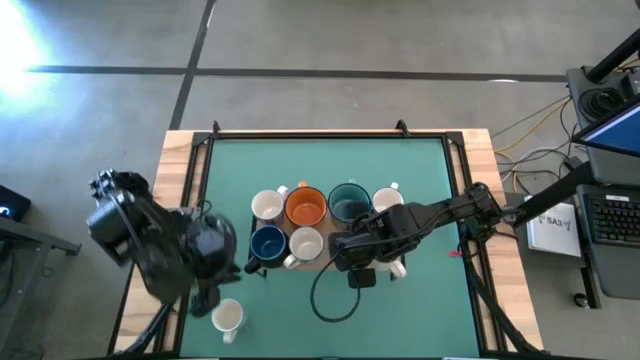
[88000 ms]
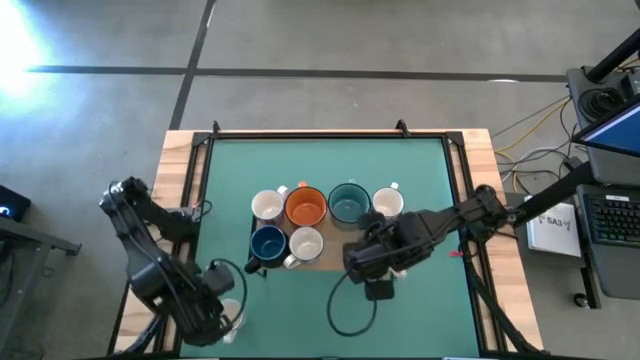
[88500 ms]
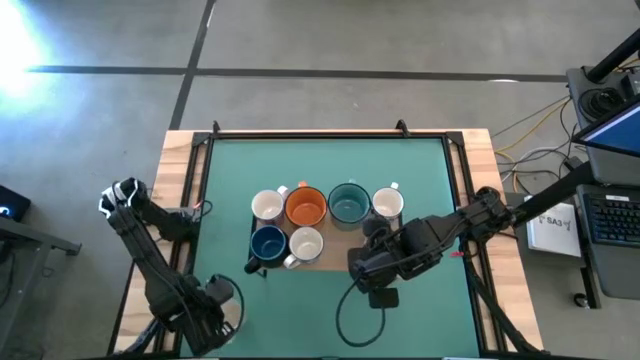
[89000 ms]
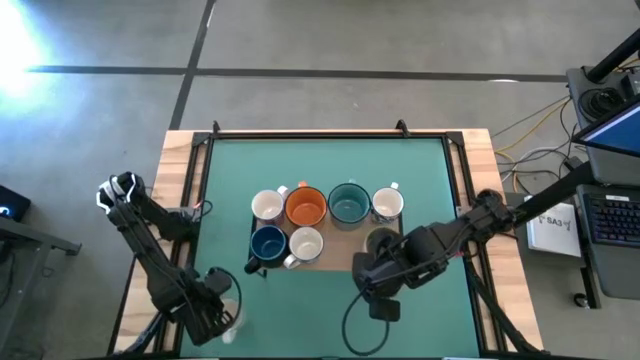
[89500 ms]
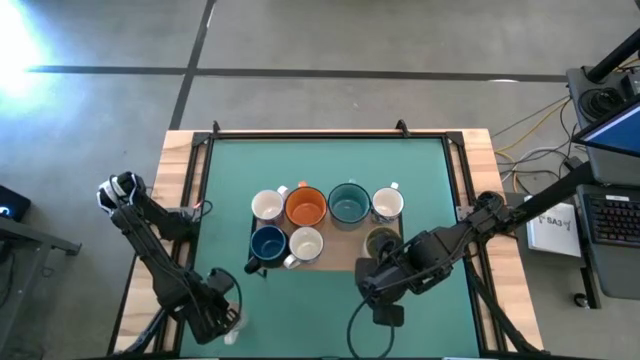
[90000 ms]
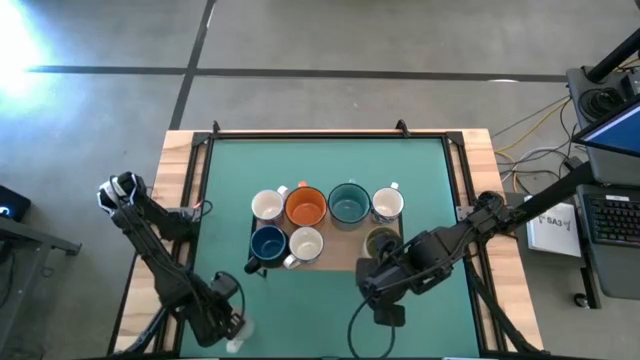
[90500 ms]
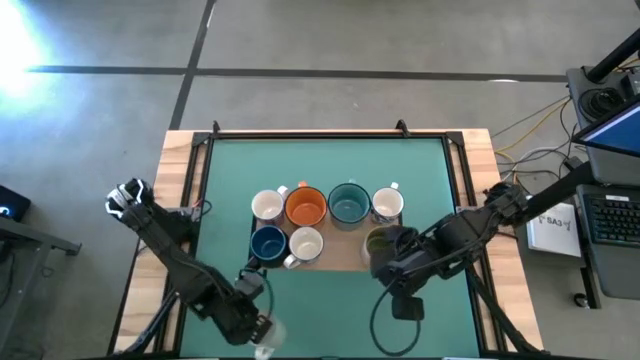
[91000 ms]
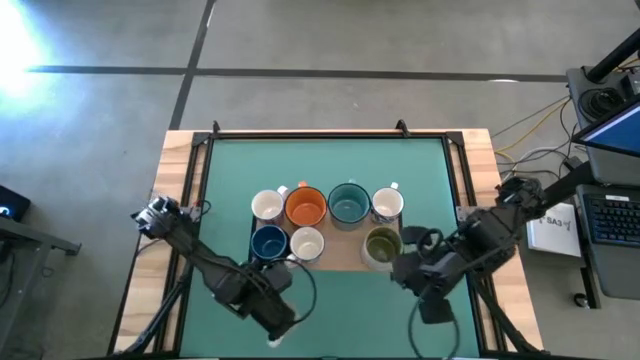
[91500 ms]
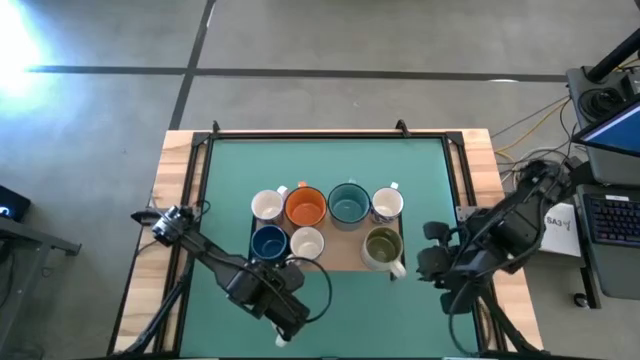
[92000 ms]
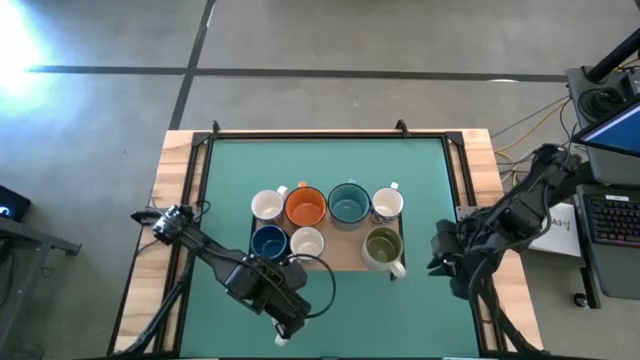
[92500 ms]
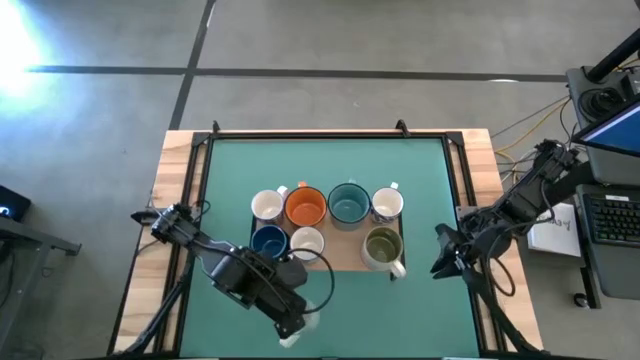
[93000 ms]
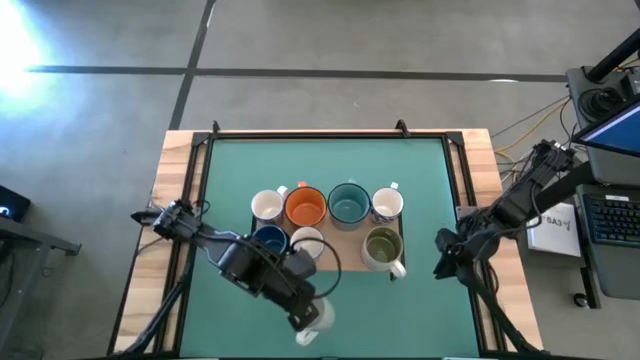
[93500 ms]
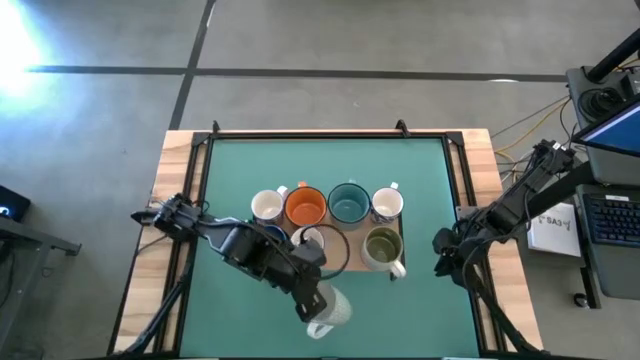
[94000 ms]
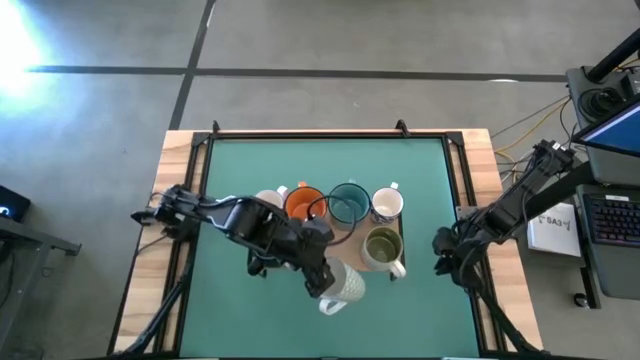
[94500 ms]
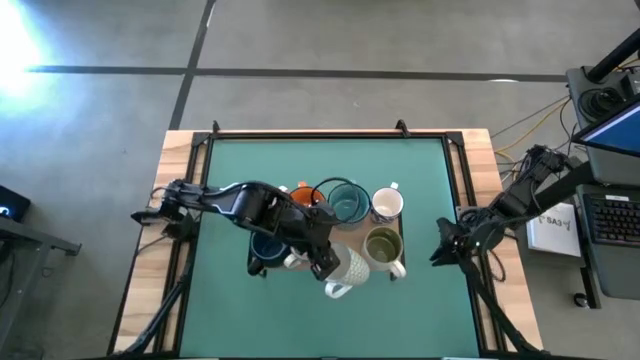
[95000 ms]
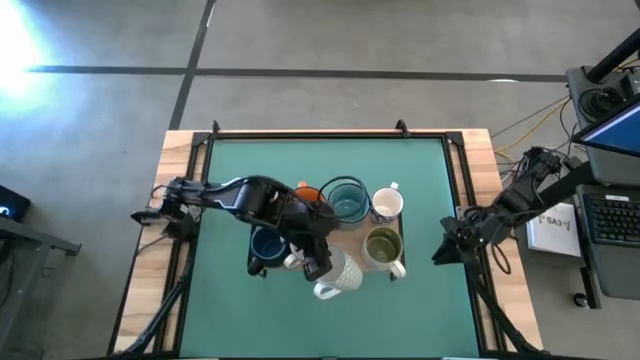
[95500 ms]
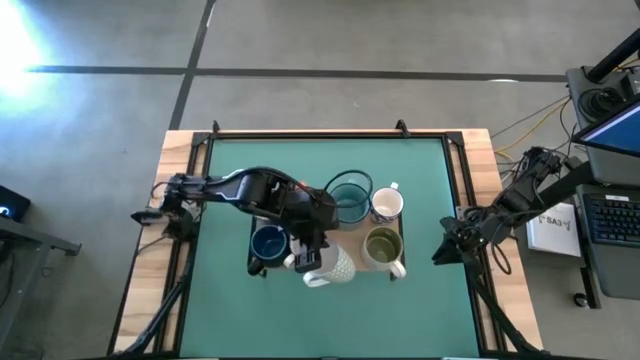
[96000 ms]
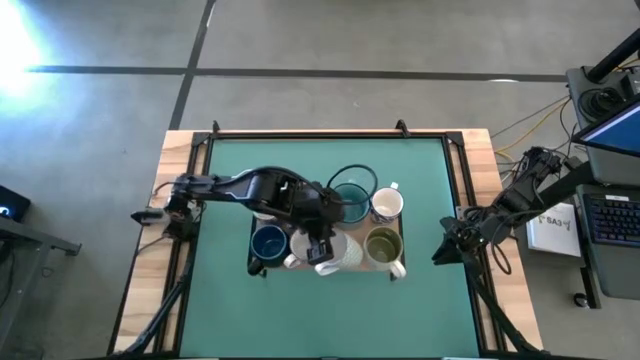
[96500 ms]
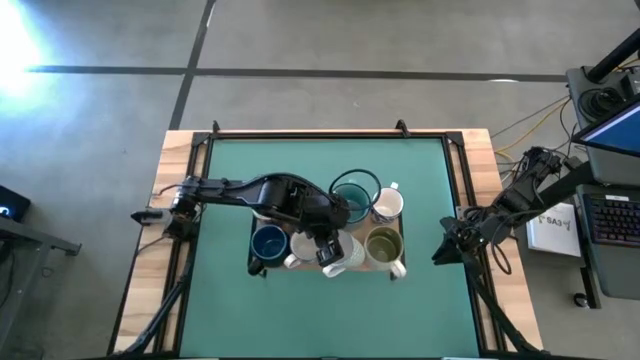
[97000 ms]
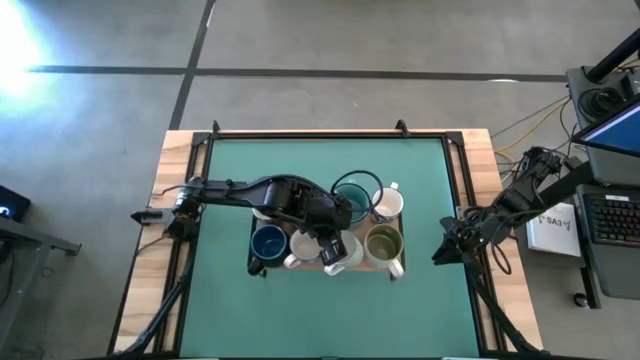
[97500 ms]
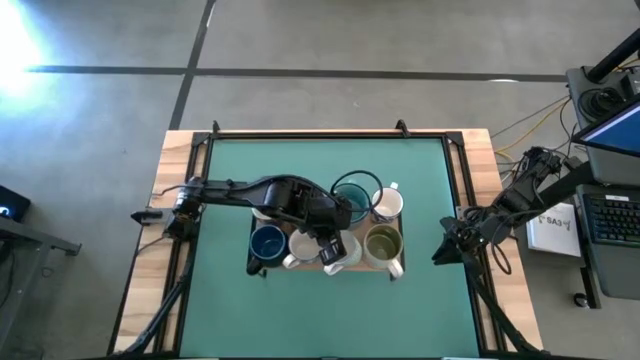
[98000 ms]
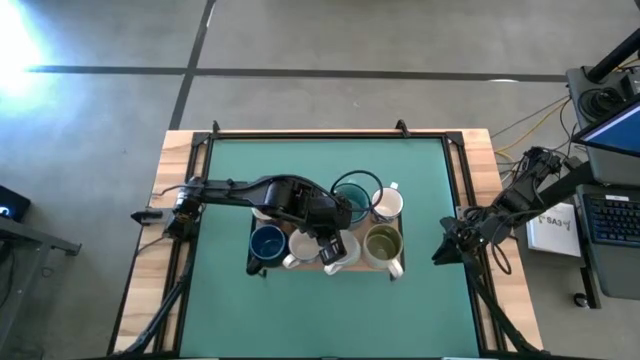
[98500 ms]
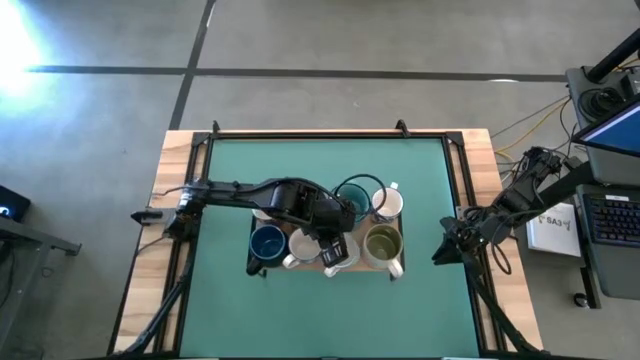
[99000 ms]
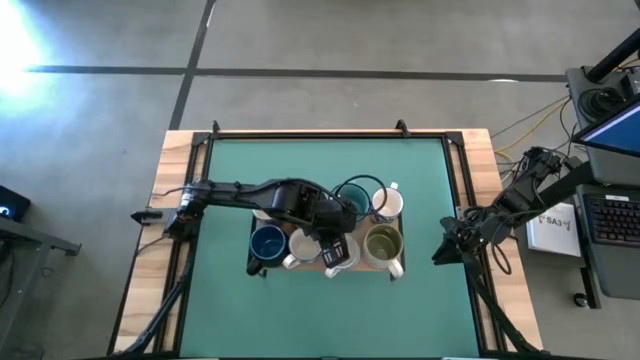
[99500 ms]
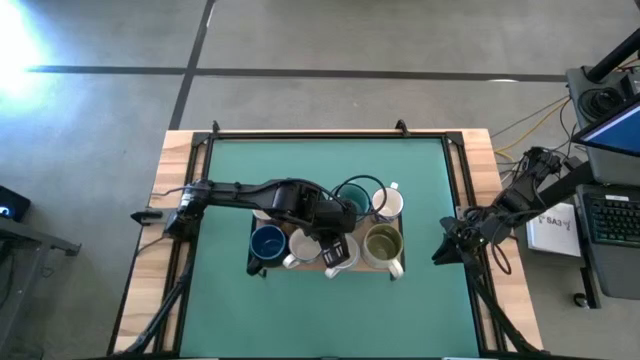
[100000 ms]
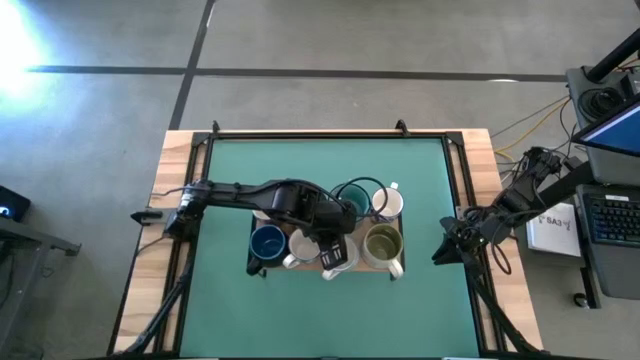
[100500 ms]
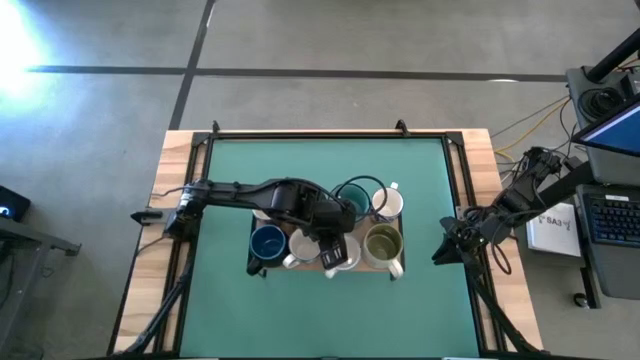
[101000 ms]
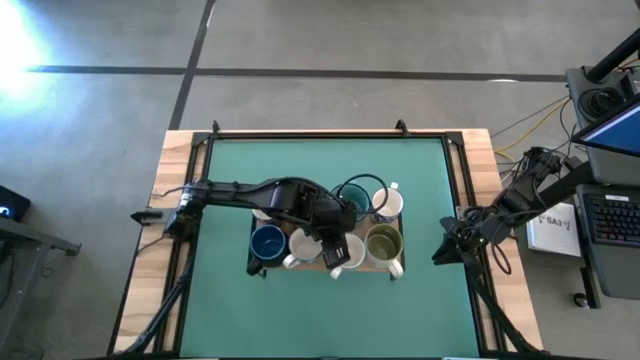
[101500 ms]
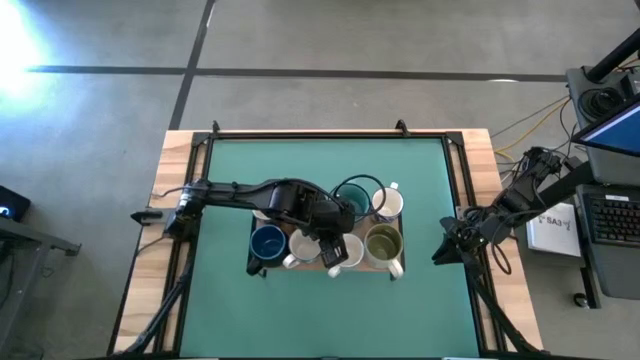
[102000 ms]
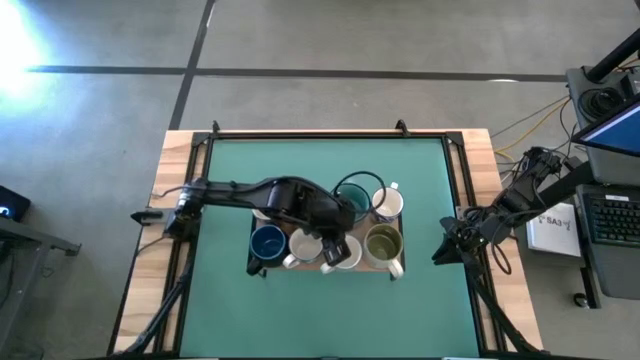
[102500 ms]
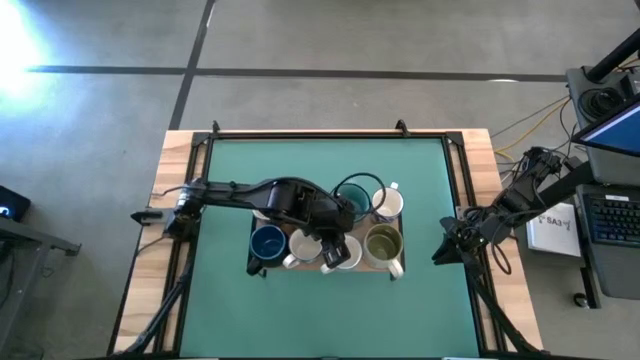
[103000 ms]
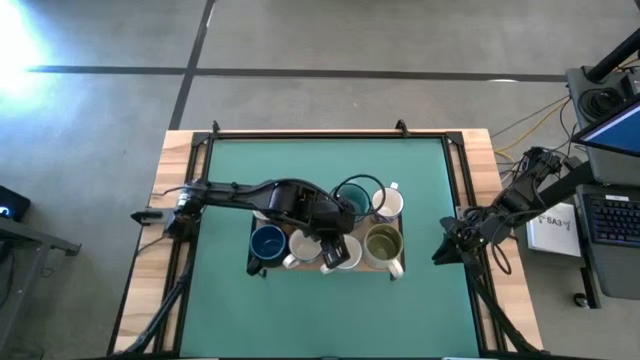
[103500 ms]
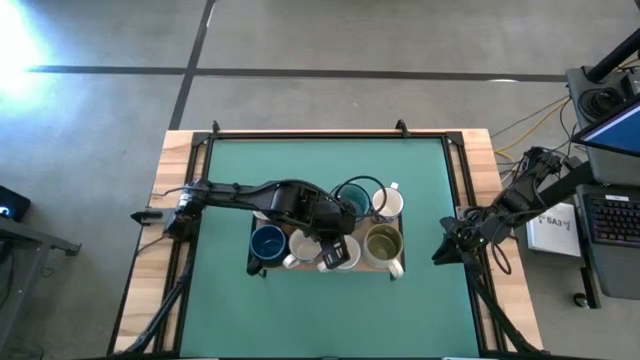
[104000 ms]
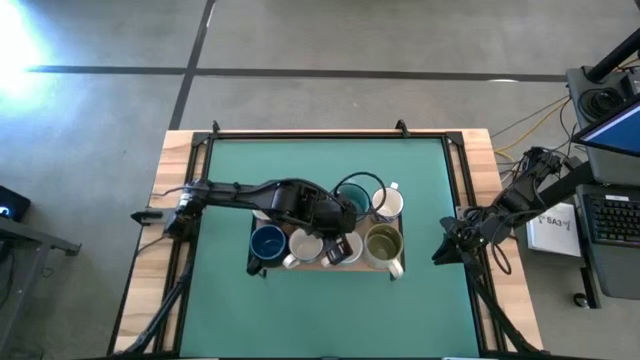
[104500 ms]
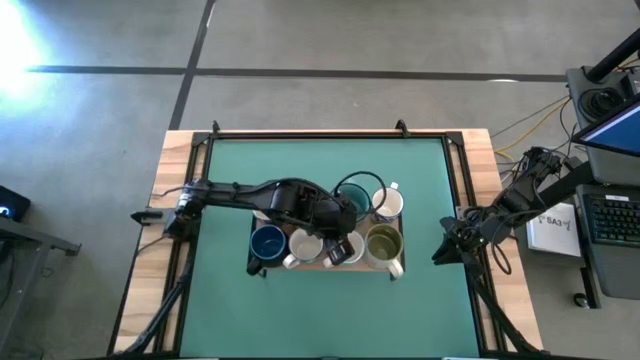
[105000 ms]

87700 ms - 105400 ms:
Task: Place coffee mugs
Put the white patterned mug on the shelf

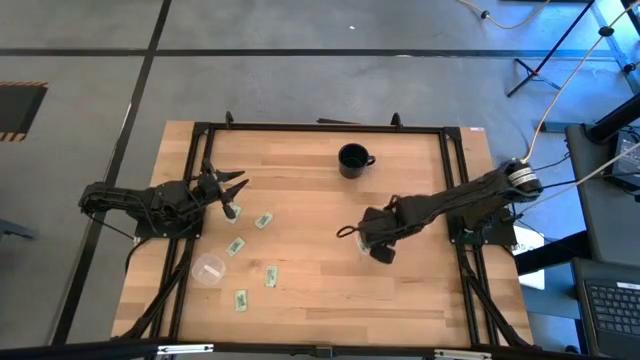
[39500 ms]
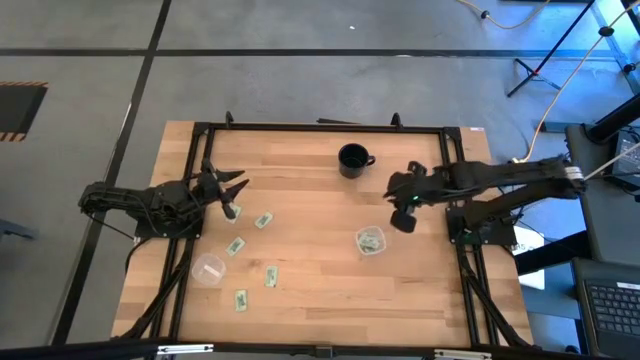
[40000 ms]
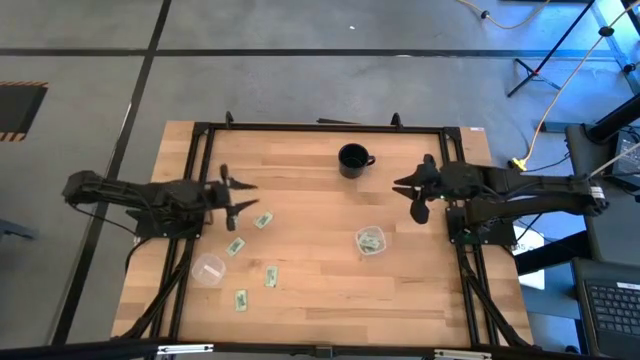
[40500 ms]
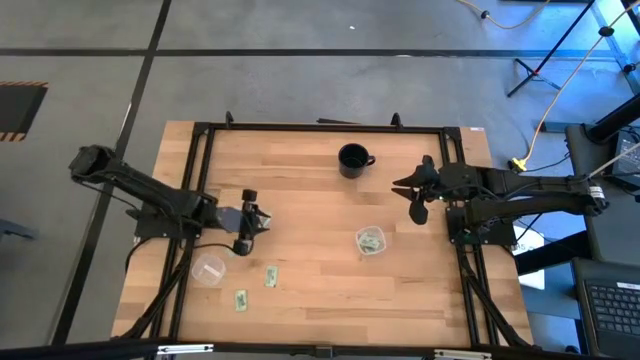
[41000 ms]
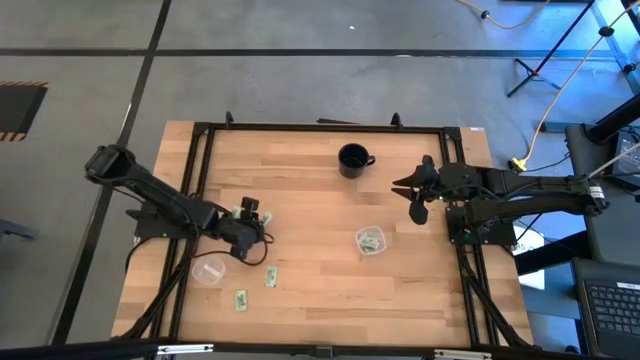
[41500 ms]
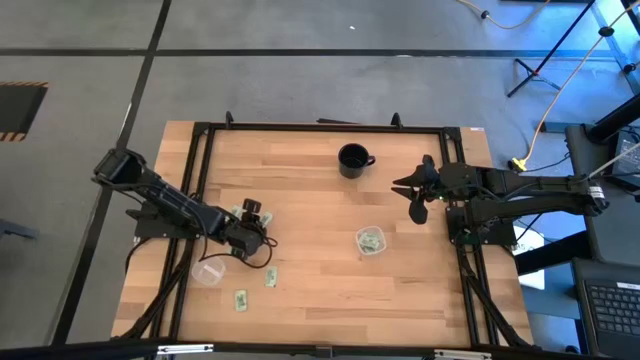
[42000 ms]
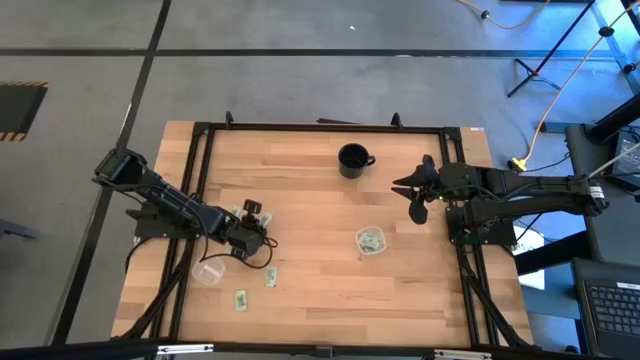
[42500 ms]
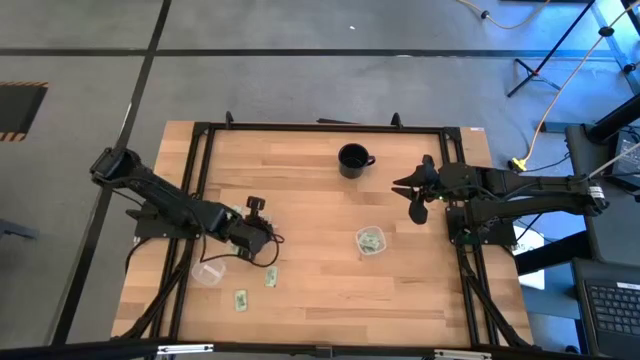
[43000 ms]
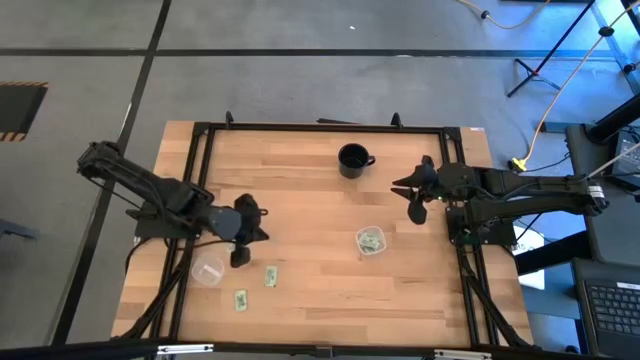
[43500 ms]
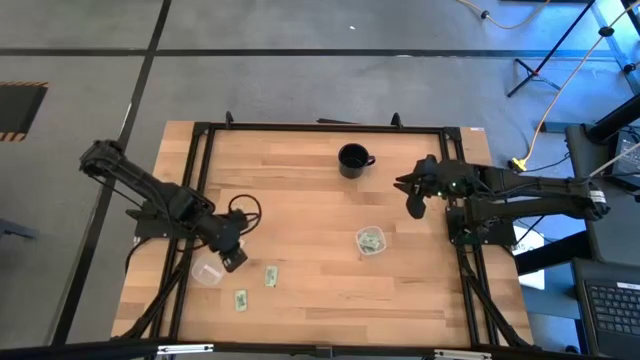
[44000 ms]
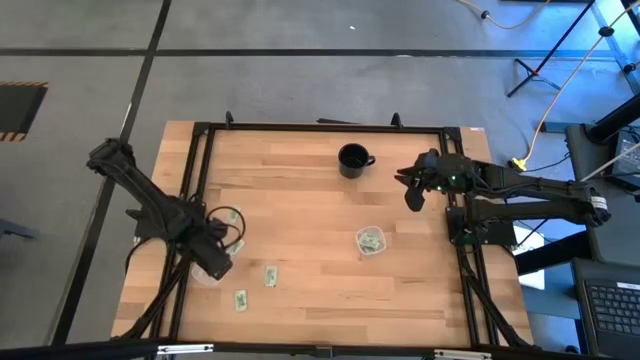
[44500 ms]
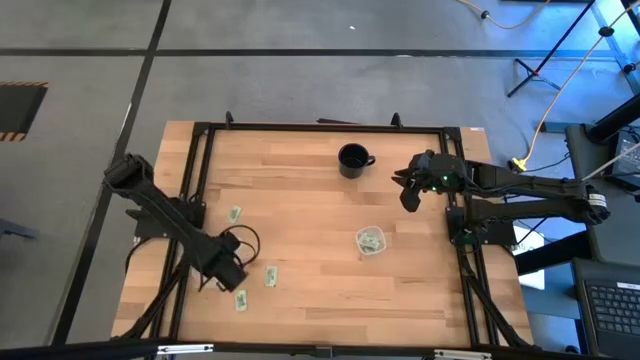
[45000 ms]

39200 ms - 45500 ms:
Task: Pick and place Stevia / Truvia into bins
Put the stevia packet into the left transparent container
